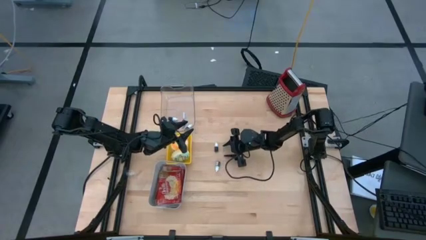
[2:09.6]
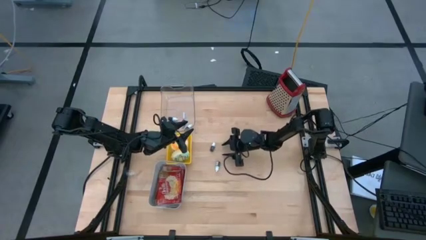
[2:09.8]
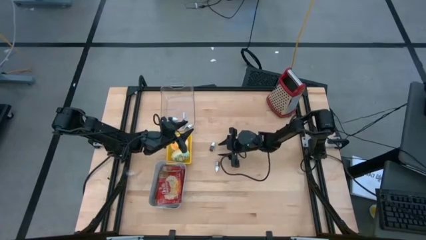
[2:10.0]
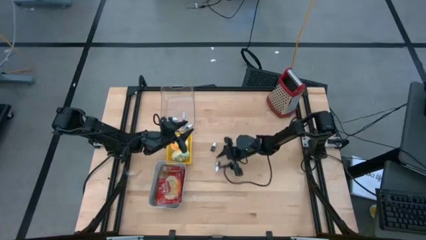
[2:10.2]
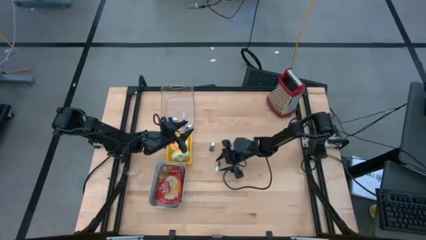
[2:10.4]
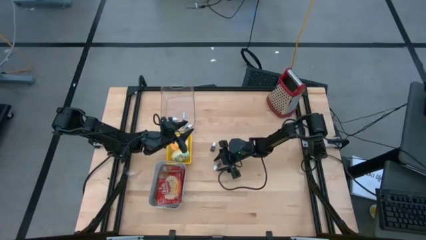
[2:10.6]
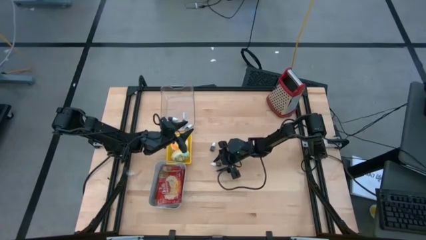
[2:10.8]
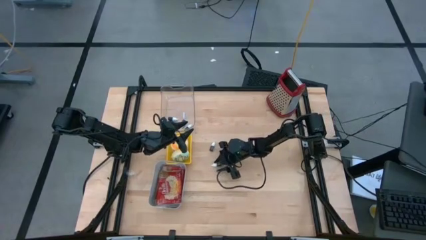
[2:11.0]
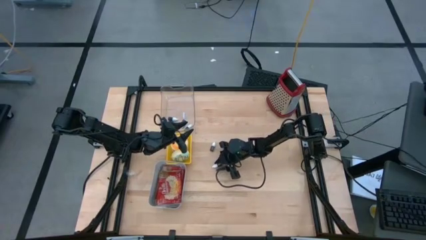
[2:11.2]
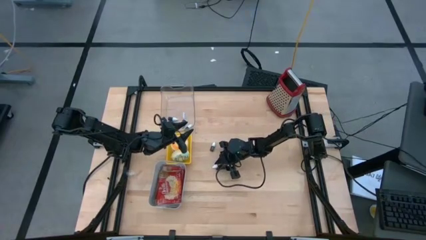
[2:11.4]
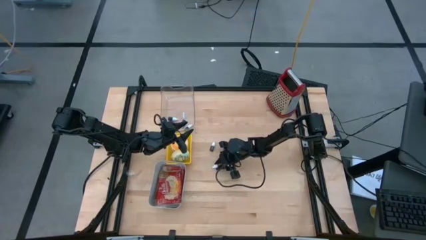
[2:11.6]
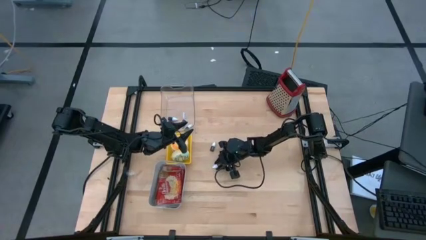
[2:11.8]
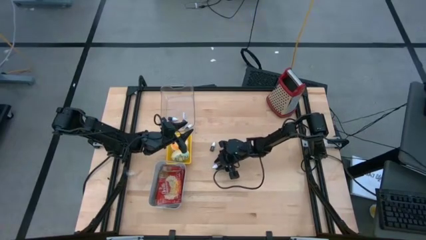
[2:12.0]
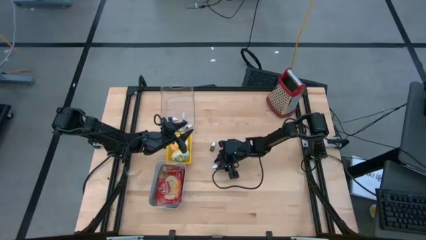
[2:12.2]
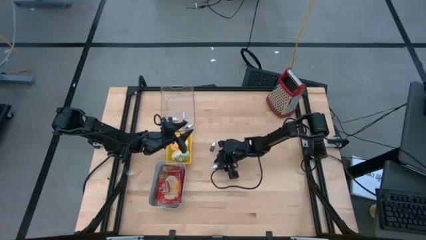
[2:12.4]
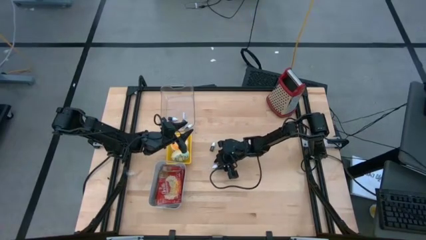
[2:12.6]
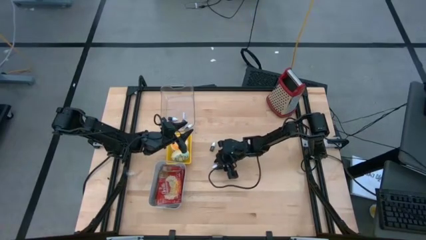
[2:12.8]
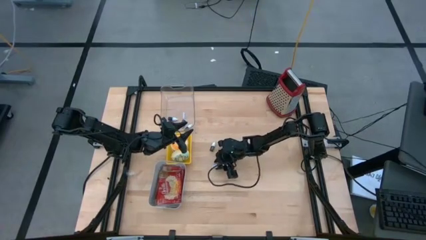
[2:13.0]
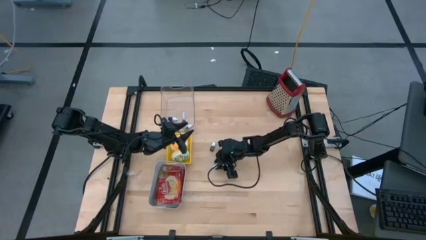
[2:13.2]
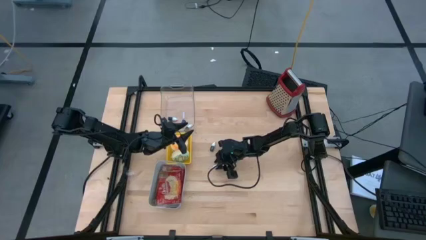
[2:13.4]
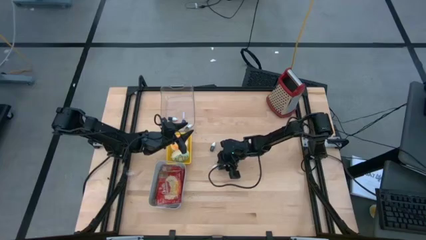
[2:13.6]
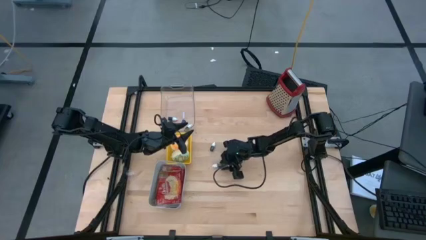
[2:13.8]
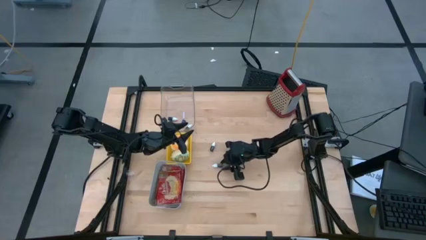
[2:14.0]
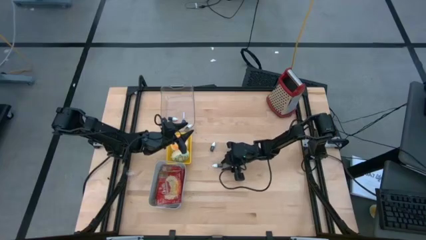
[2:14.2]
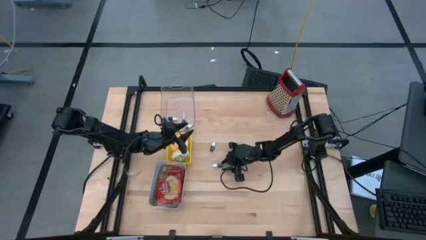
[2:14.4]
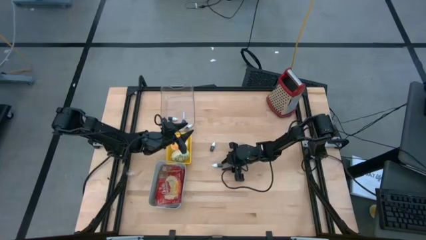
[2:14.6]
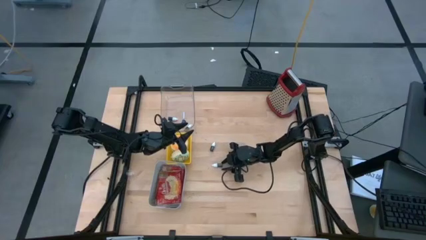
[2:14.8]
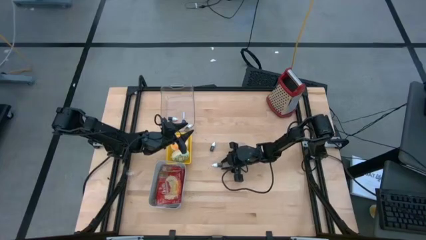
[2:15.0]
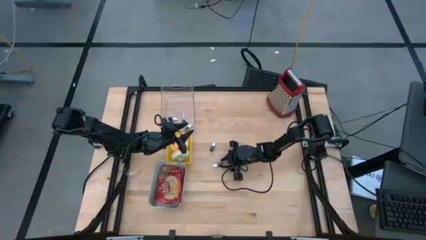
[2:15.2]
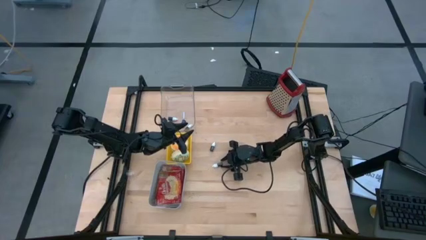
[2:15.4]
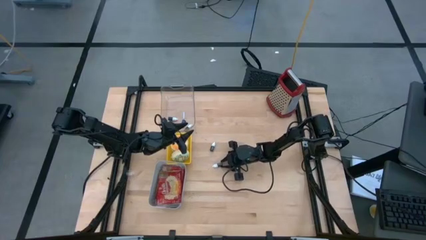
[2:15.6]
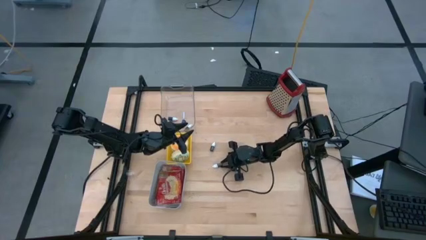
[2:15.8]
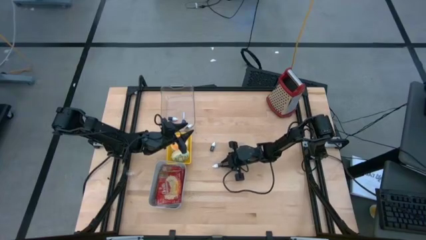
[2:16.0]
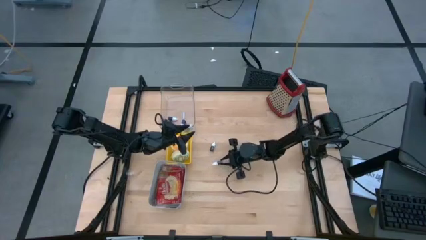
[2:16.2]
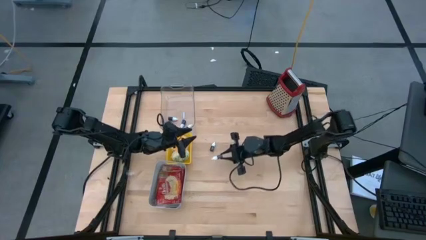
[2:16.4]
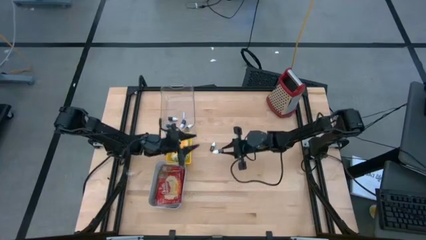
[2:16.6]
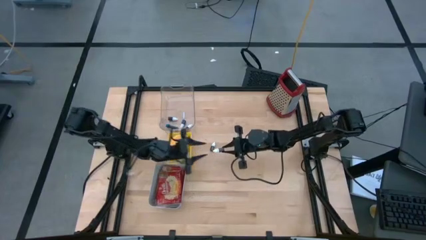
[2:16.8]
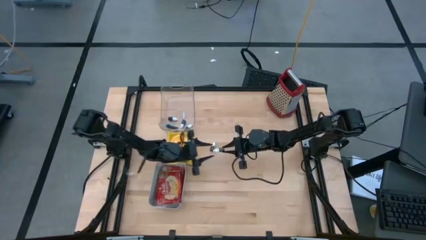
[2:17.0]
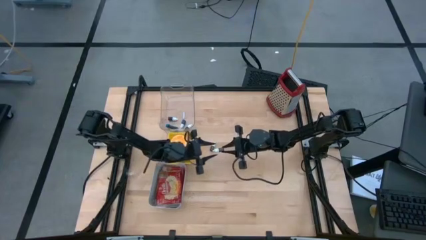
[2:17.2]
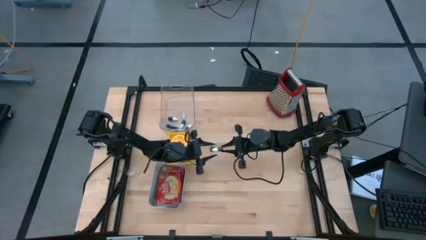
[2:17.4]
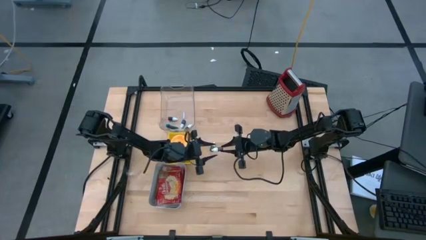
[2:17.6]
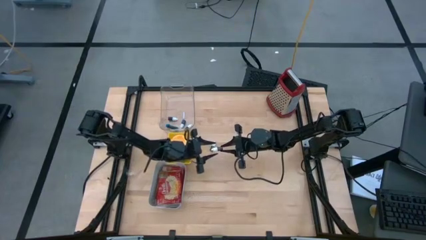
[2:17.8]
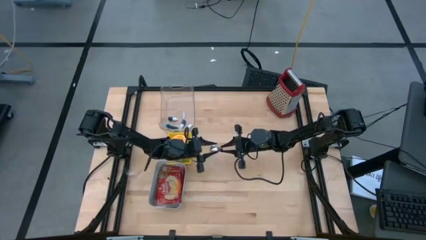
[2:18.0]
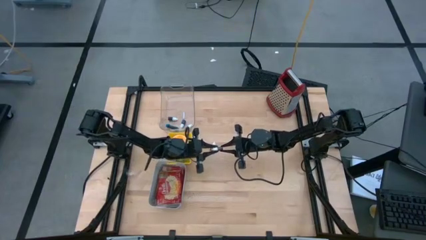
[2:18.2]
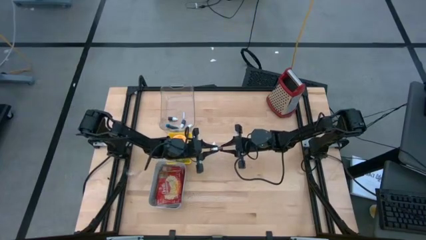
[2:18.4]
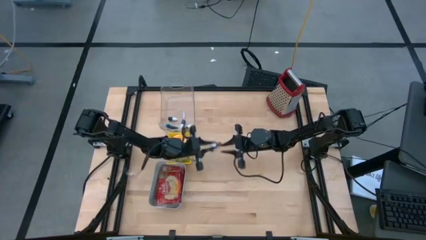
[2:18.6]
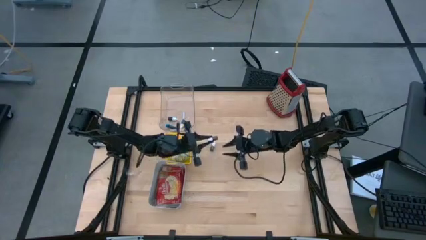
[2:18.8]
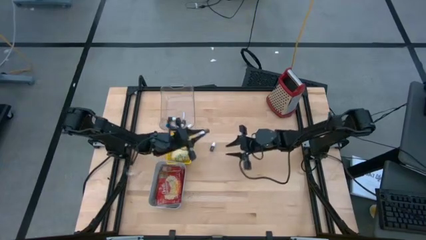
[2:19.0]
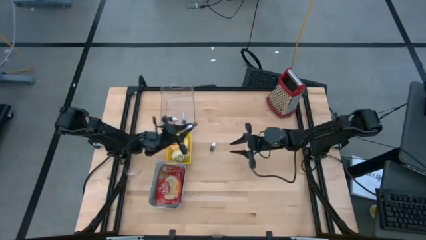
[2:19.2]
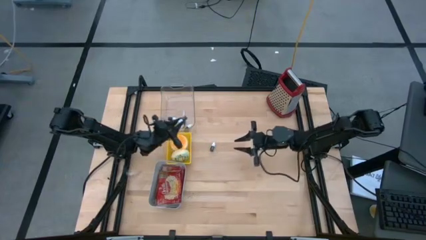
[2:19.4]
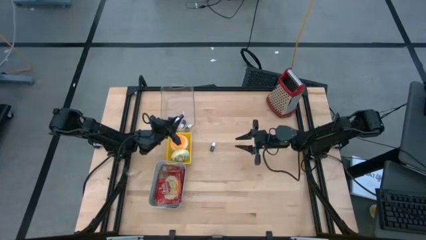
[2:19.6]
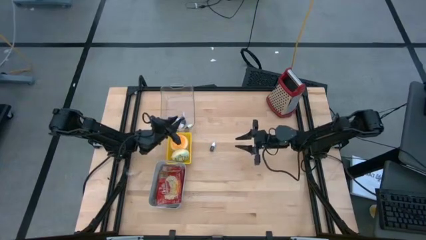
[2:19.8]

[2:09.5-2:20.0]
Task: Pick & Place Food Item
Put the brown food coloring bottle into the transparent bin

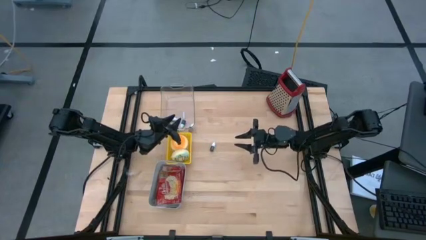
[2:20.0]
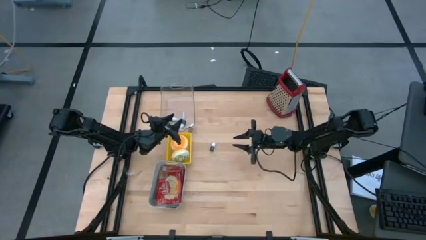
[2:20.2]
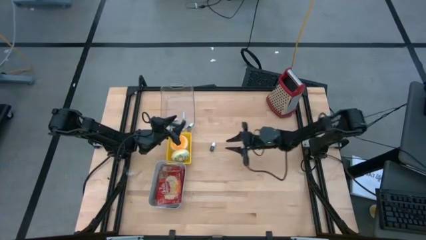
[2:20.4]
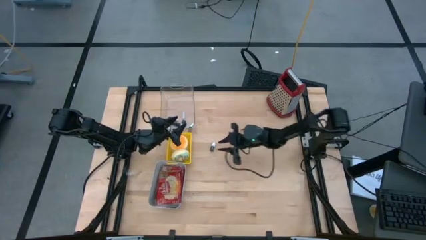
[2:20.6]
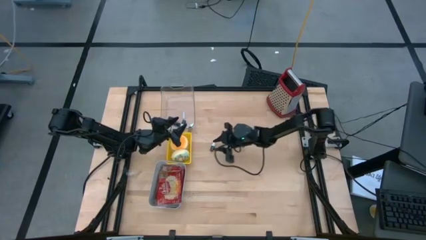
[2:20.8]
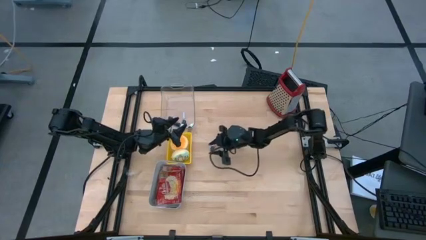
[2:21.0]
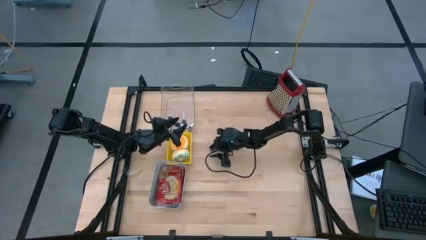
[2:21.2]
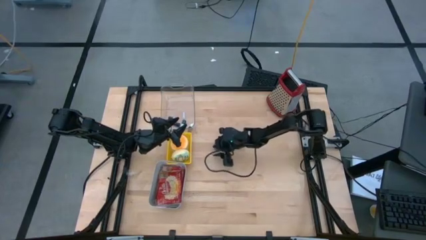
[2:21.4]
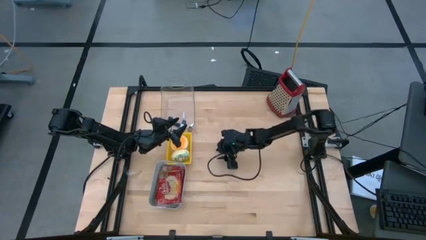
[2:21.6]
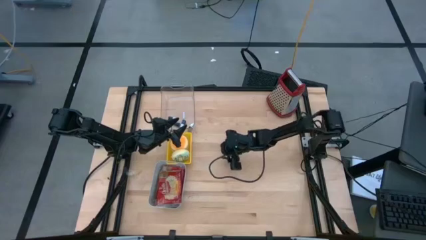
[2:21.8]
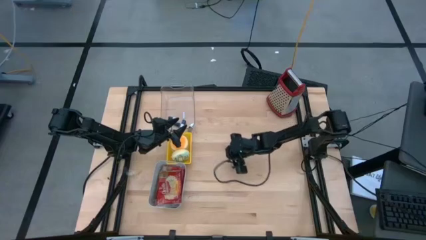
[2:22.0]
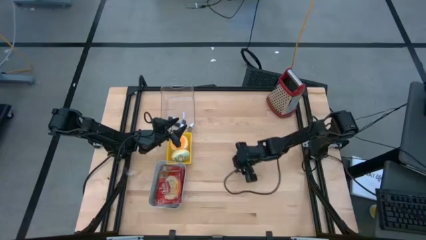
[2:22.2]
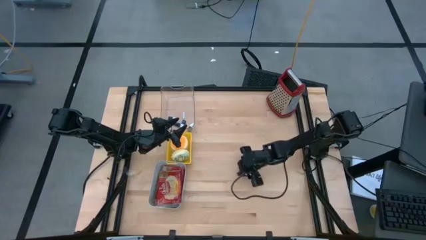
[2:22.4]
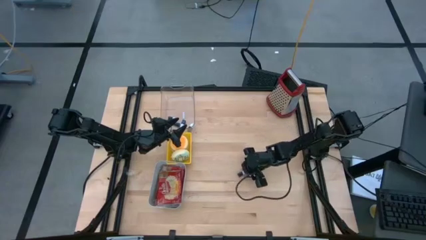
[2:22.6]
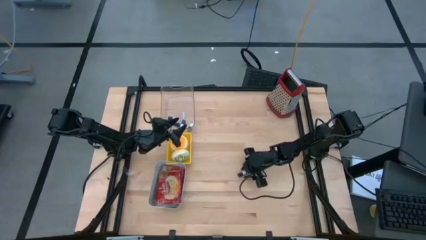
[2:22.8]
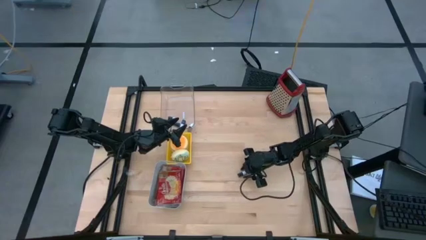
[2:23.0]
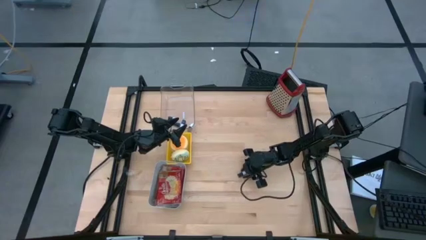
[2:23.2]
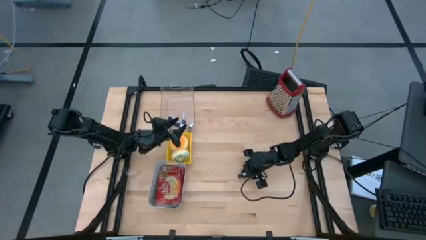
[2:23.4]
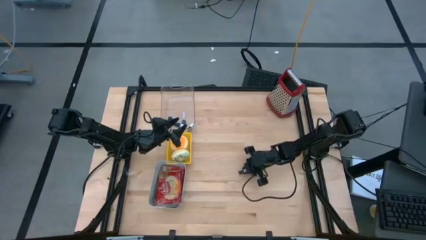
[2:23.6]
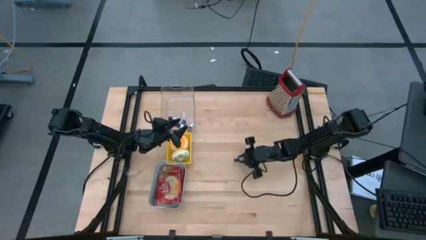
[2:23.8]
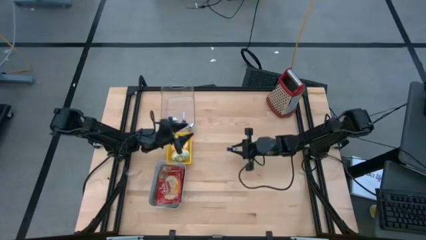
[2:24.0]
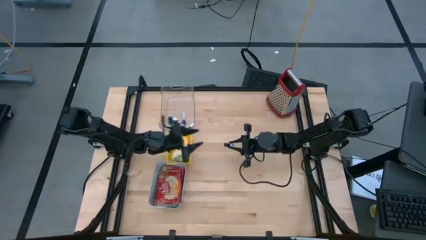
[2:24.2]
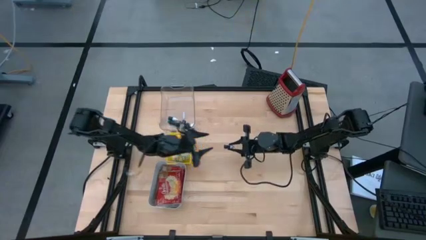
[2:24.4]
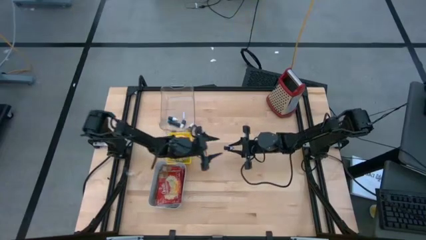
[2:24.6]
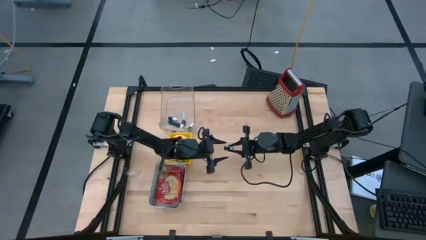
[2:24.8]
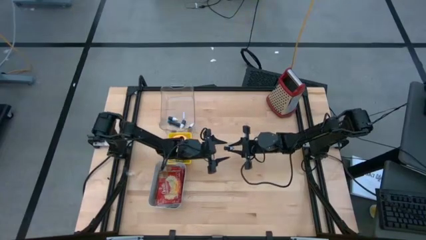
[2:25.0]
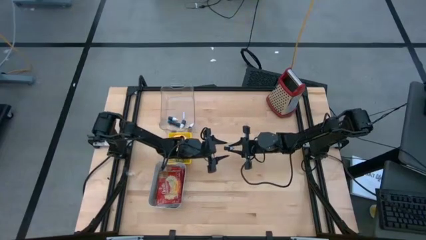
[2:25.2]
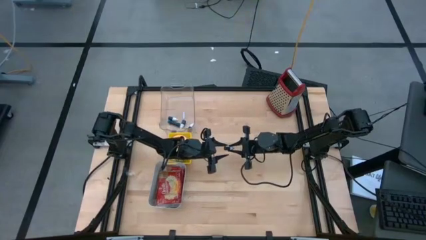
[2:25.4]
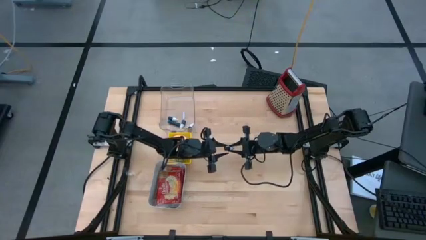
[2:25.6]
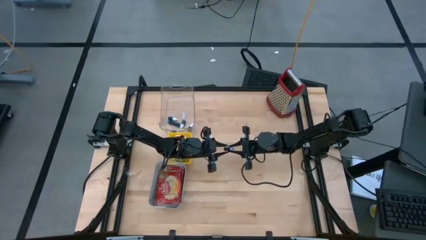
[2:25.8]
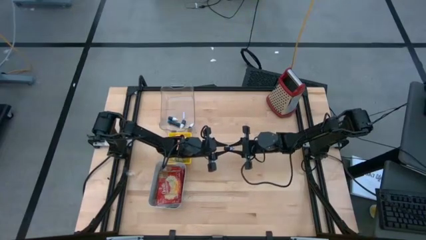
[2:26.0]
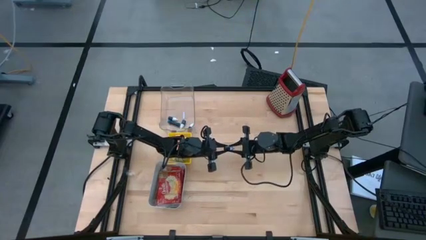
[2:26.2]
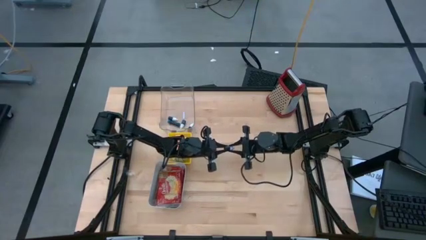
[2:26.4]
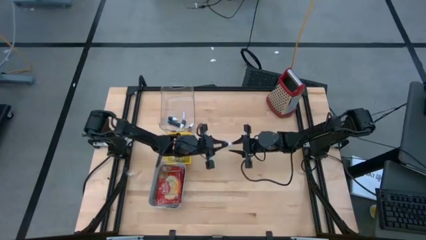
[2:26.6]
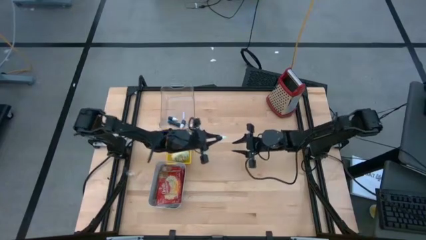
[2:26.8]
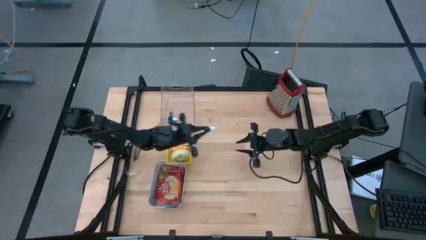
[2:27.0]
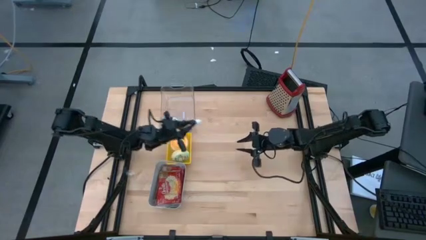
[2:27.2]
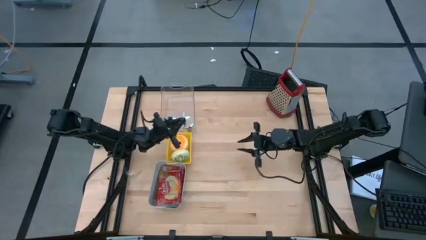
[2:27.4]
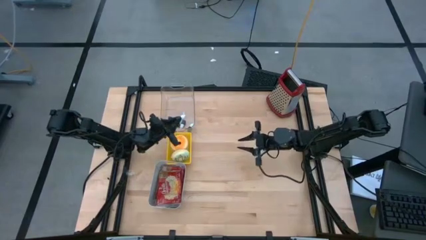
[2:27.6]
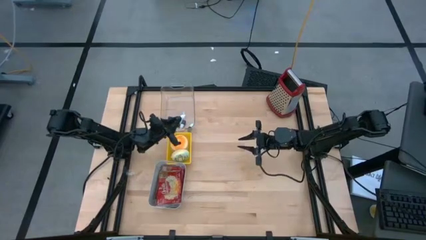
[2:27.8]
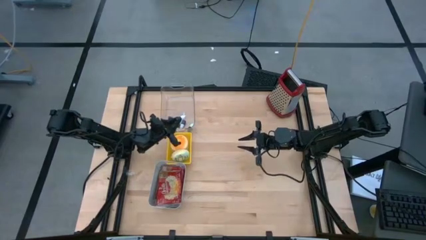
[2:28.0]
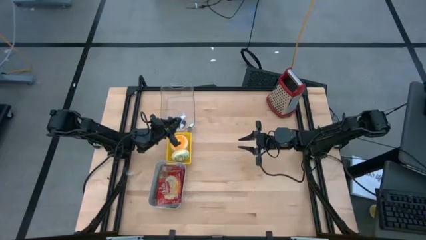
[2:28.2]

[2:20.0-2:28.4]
Put the green food coloring bottle into the transparent bin
